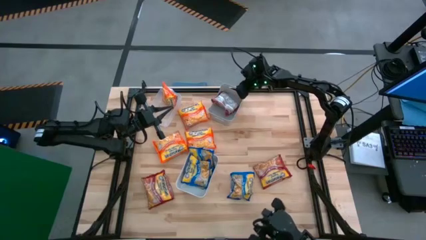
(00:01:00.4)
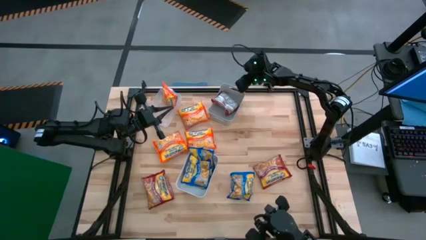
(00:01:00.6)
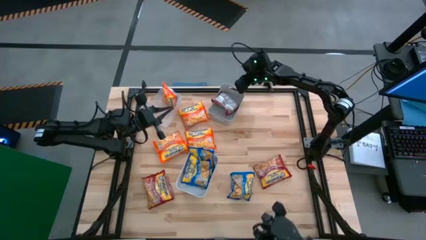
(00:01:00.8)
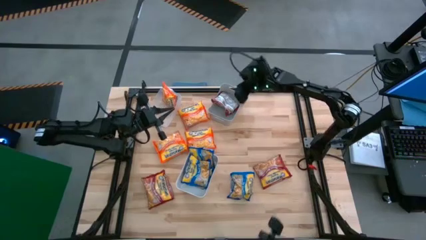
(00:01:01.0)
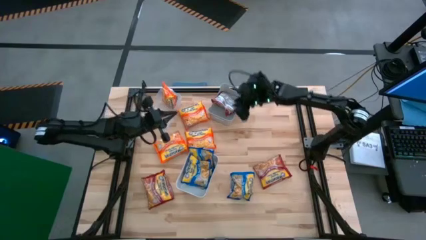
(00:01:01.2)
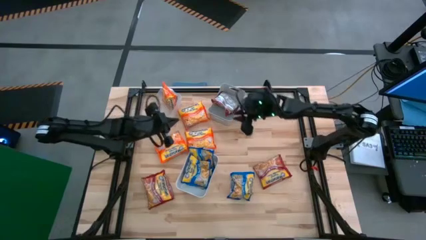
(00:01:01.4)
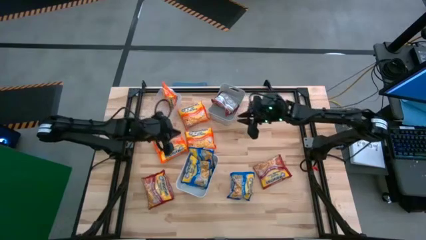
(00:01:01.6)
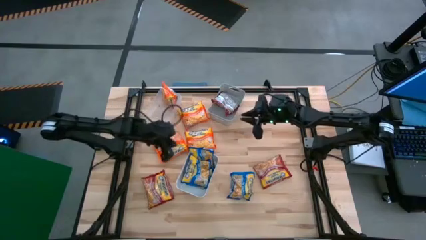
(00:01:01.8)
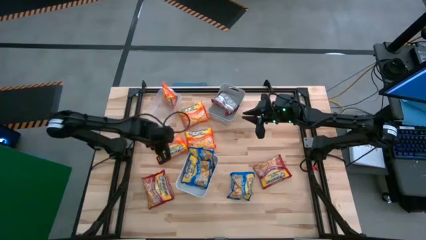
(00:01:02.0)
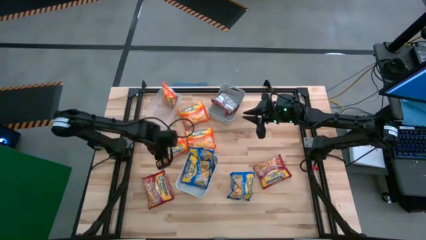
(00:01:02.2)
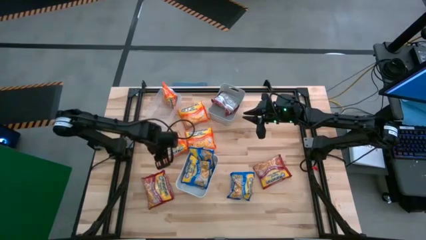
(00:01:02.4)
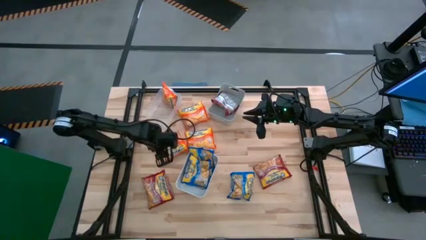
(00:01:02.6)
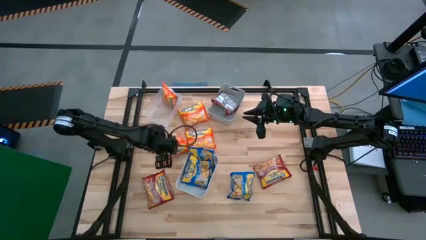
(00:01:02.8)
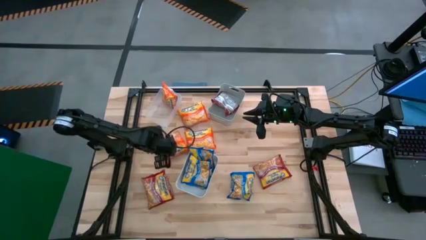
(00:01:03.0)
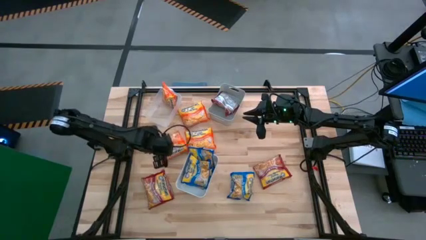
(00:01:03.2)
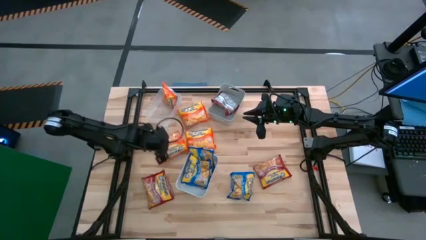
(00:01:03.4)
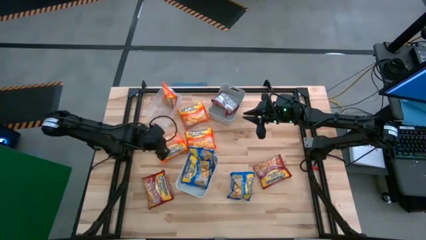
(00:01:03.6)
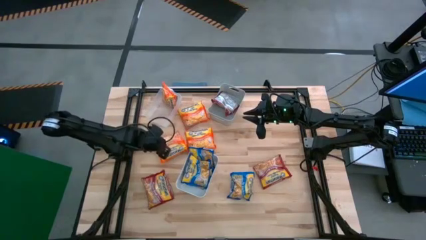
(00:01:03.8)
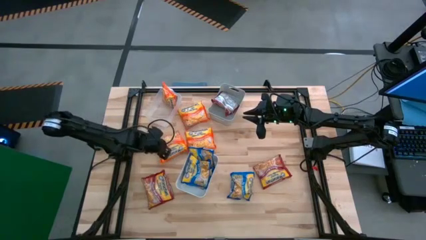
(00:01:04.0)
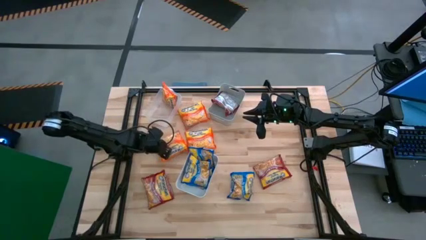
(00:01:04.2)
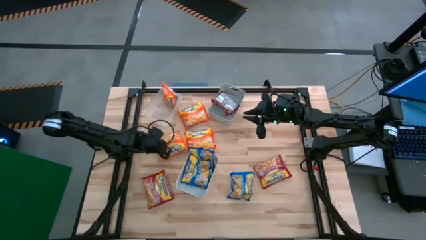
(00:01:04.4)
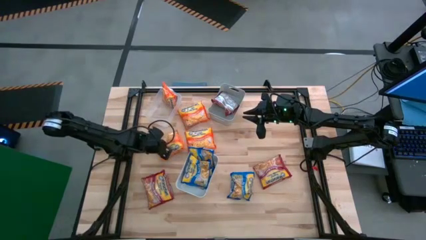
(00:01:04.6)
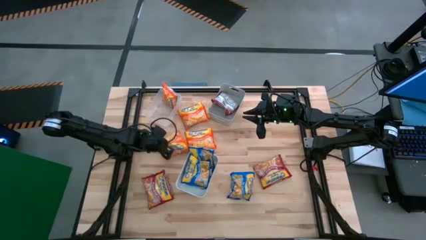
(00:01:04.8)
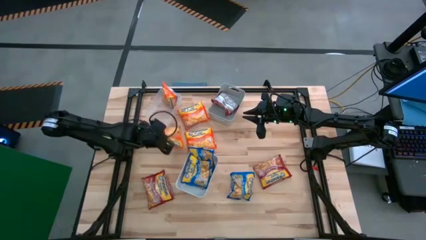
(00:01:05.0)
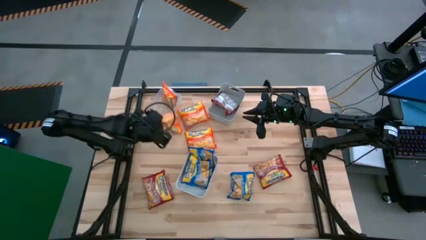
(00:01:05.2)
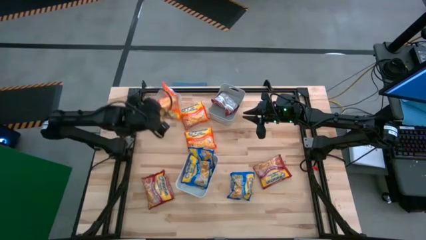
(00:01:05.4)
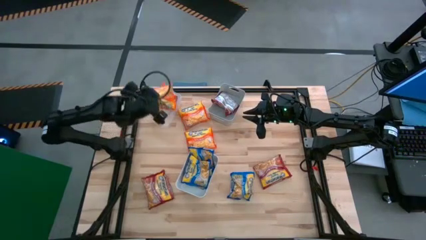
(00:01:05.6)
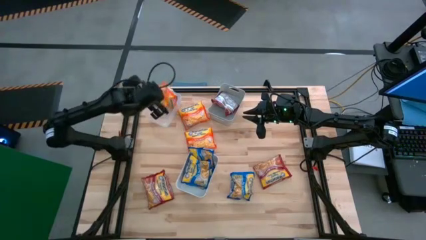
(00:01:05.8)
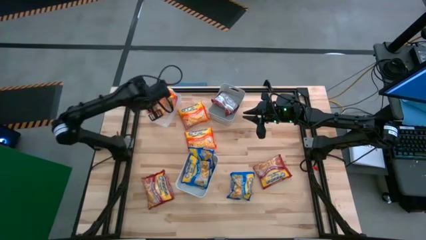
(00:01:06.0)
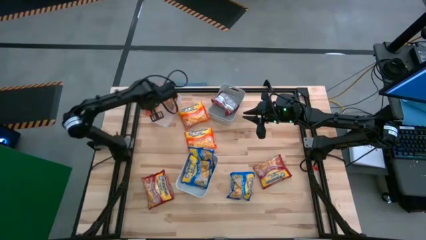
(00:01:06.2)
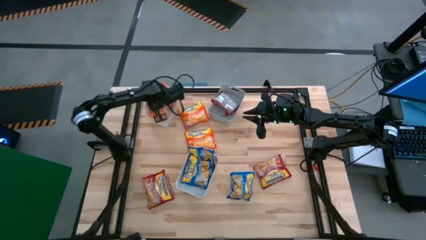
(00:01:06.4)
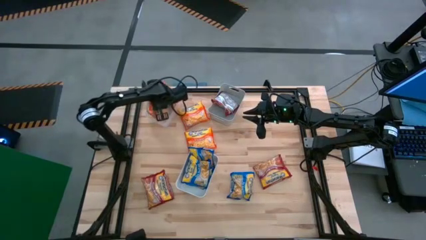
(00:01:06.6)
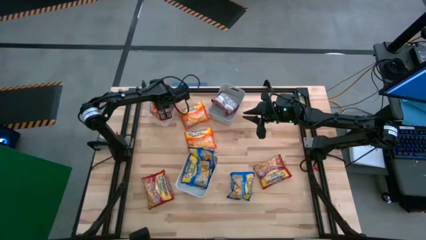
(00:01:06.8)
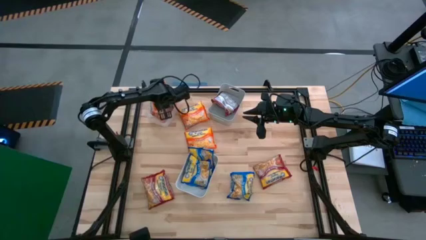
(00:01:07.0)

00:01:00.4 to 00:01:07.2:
Task: Sort Maruchan noodles
Put the orange noodle pack into the transparent bin

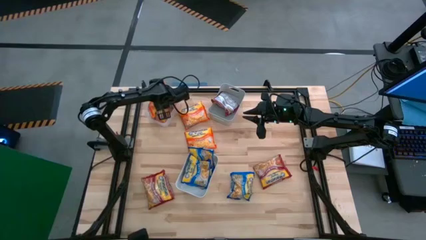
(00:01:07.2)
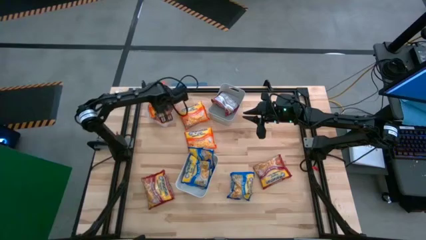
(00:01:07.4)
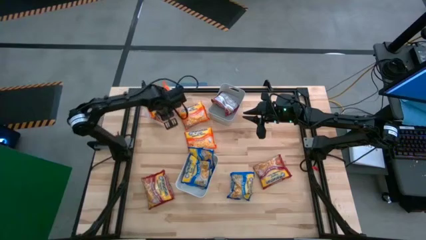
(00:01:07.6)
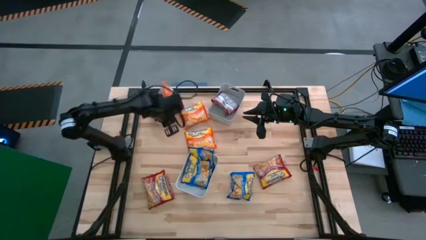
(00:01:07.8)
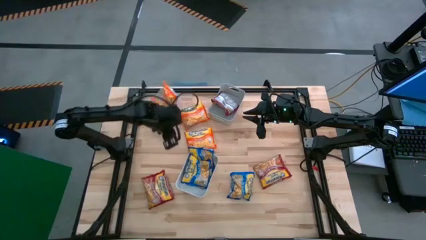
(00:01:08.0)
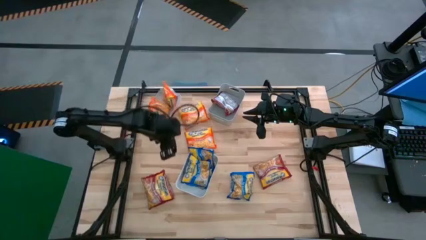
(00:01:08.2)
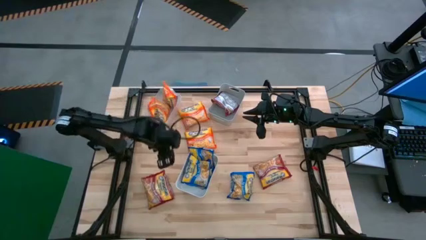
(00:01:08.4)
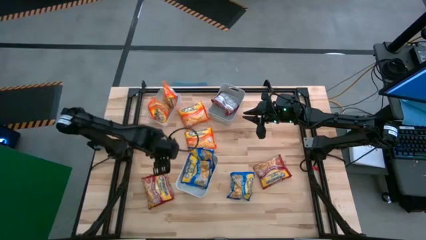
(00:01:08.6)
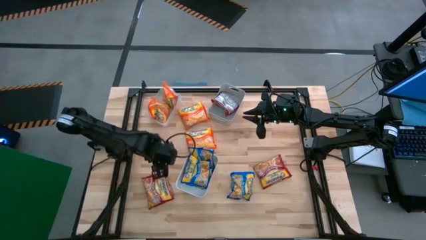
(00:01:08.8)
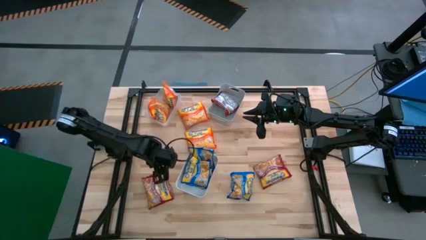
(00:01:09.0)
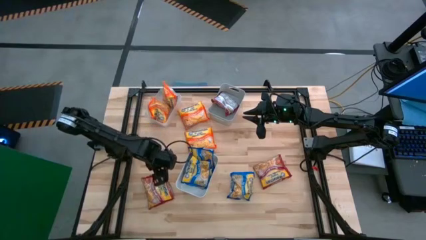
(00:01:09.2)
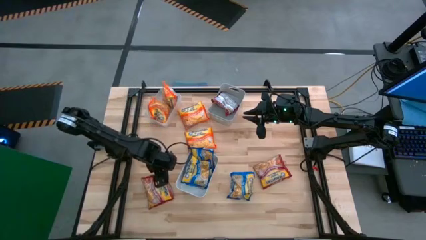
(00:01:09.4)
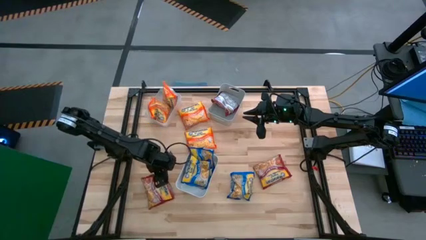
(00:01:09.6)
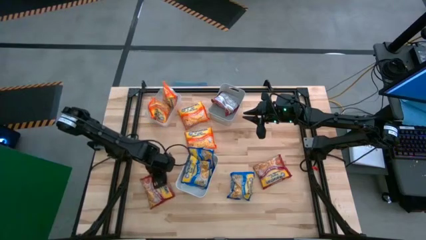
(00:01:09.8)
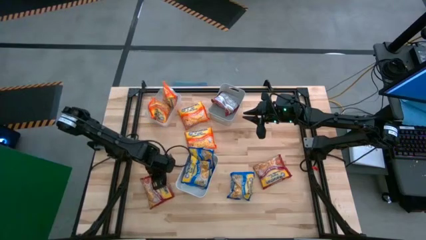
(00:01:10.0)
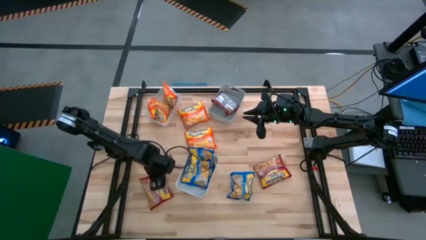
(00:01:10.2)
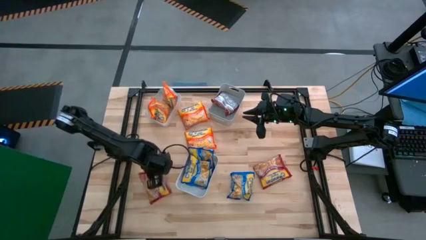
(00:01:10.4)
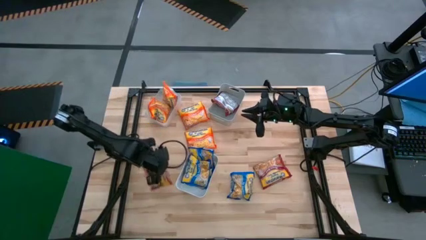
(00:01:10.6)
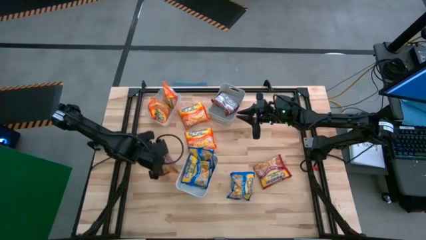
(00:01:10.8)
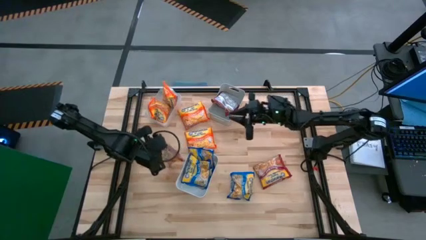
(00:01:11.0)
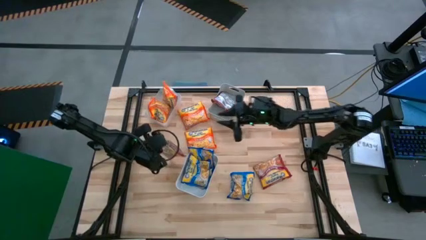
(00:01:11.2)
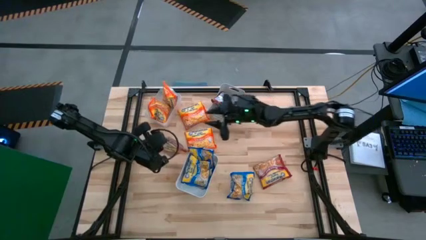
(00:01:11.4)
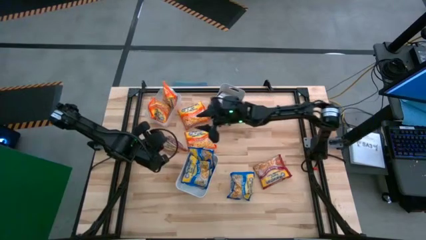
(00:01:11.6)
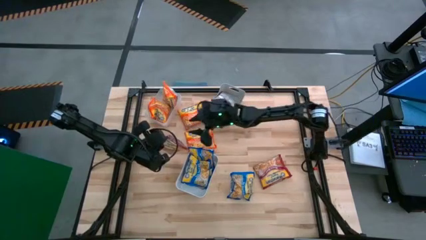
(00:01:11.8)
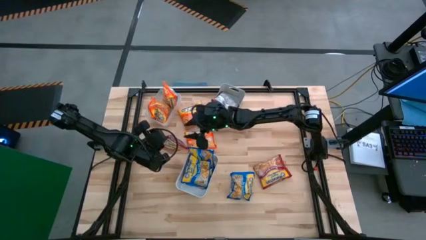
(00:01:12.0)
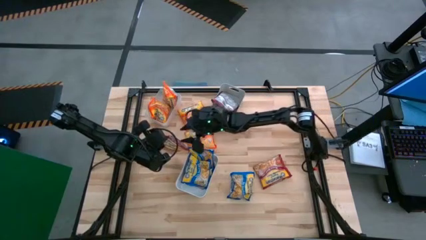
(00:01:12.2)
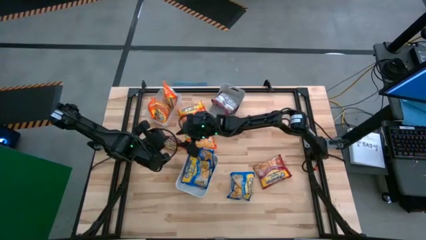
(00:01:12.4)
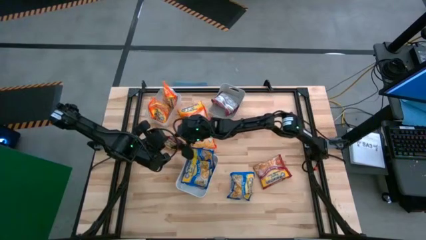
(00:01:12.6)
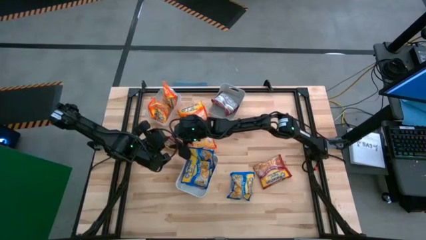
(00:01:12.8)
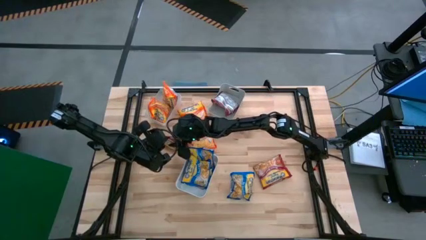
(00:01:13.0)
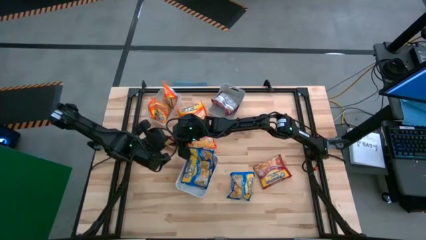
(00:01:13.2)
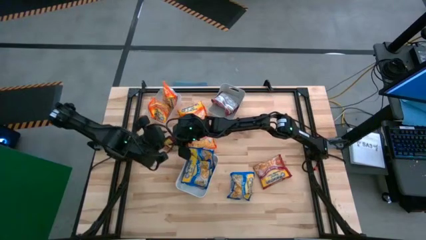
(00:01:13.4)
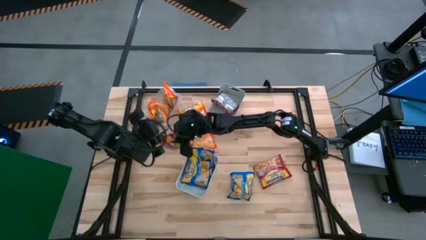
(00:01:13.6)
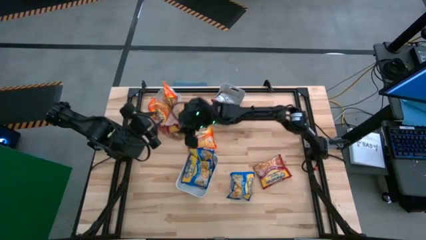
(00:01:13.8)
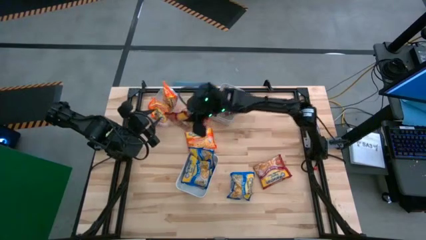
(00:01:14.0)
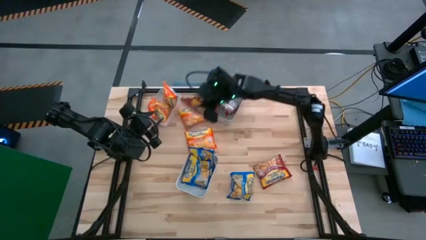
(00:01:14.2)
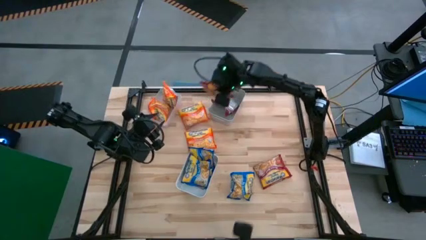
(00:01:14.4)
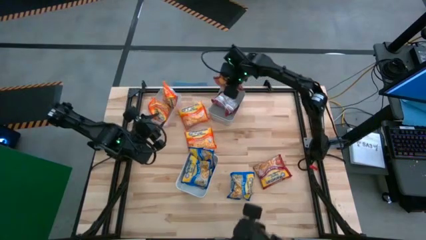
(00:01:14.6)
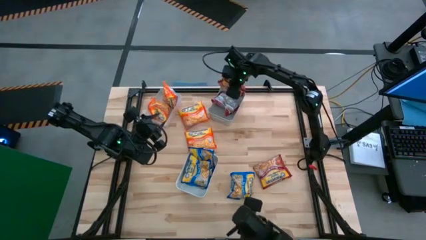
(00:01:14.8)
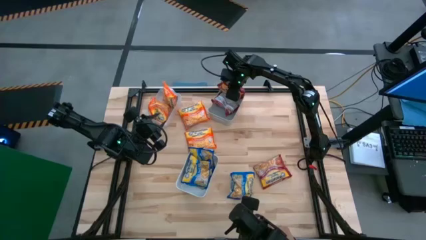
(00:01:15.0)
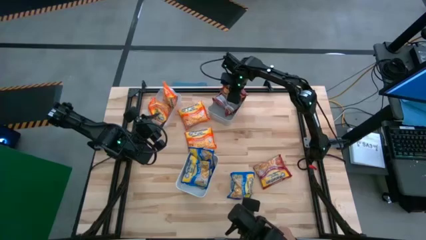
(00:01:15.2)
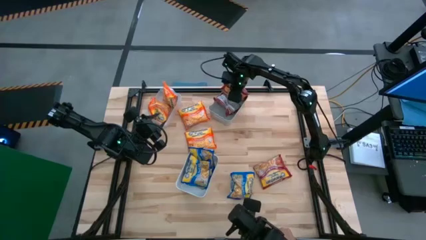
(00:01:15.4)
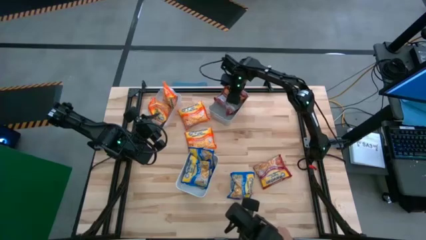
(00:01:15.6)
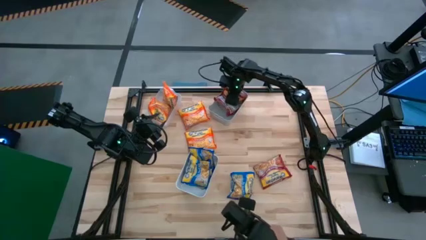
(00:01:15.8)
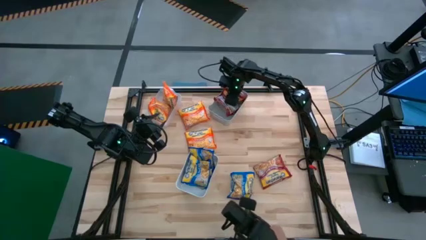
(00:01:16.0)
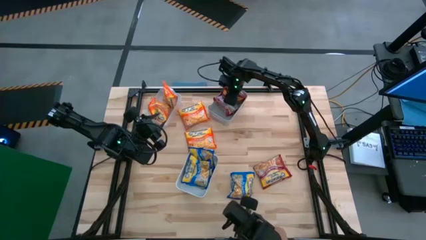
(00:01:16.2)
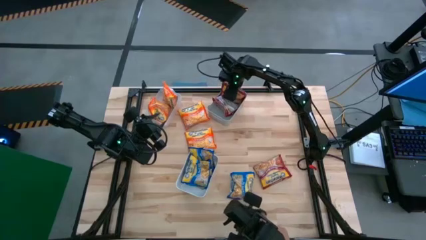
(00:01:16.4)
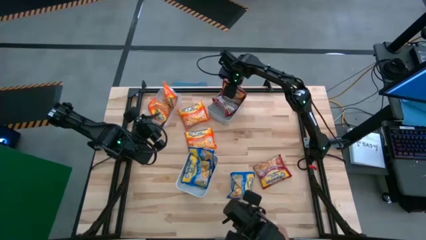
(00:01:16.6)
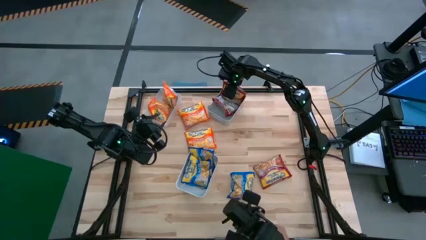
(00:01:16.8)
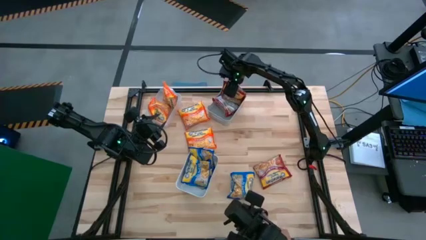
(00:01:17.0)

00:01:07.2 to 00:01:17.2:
Put the left red noodle pack into the gray bin
